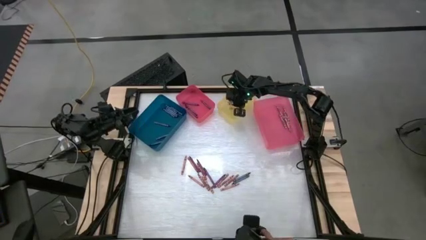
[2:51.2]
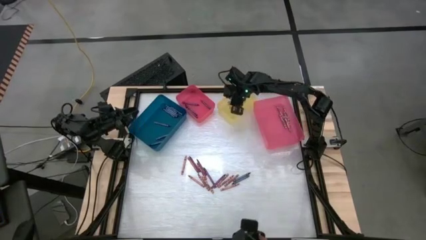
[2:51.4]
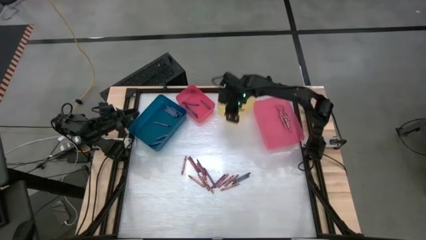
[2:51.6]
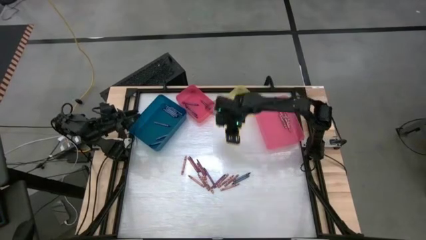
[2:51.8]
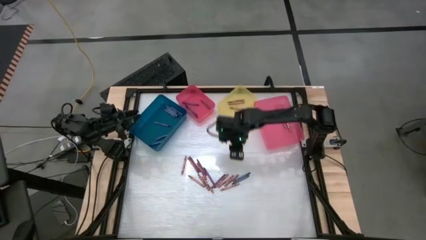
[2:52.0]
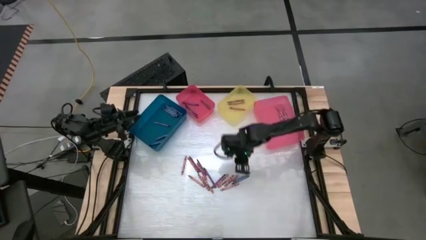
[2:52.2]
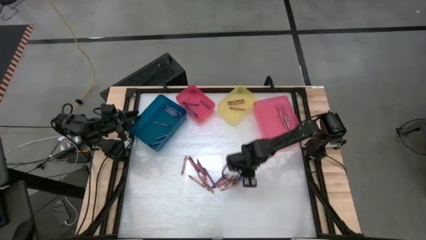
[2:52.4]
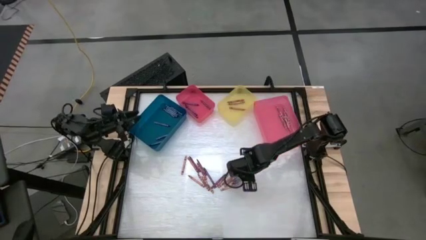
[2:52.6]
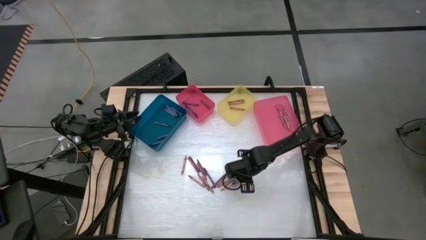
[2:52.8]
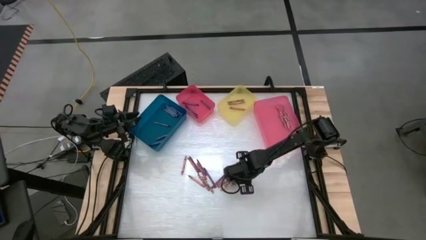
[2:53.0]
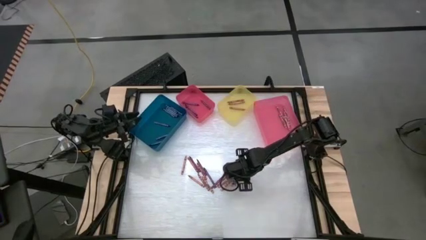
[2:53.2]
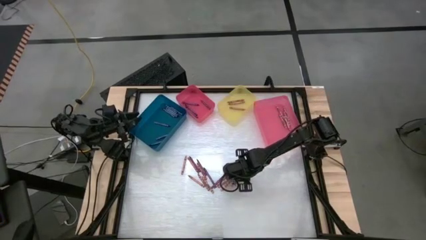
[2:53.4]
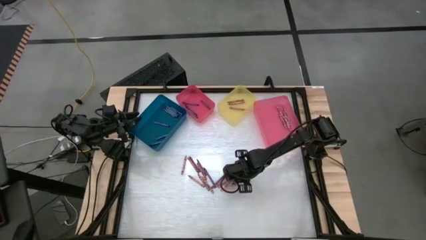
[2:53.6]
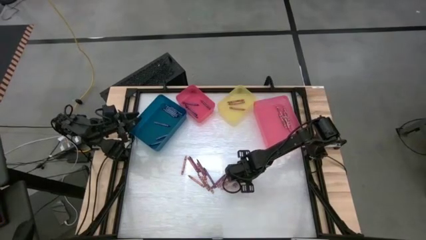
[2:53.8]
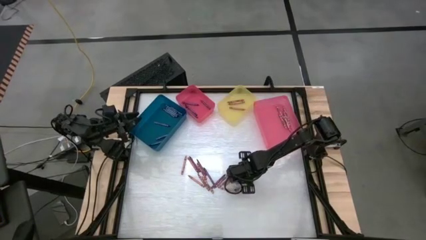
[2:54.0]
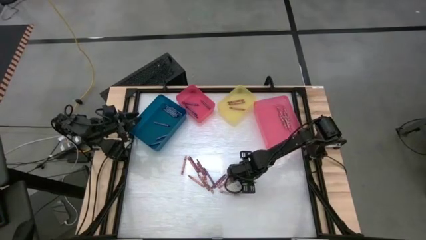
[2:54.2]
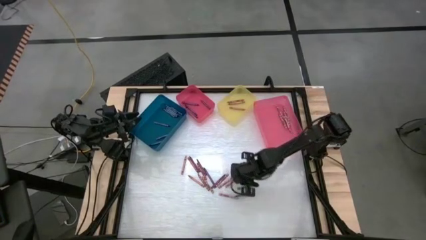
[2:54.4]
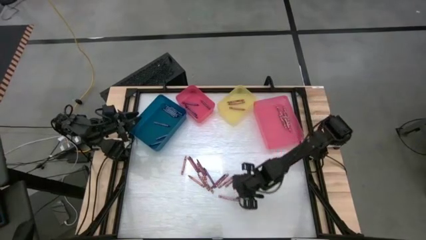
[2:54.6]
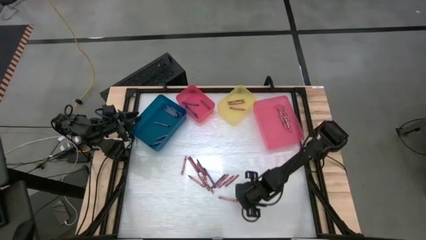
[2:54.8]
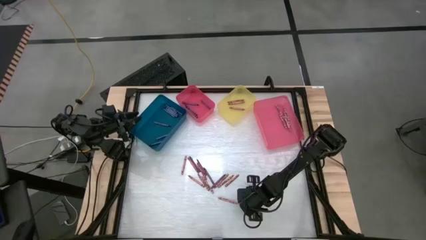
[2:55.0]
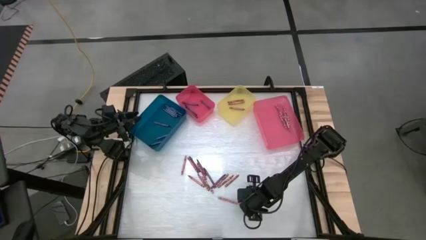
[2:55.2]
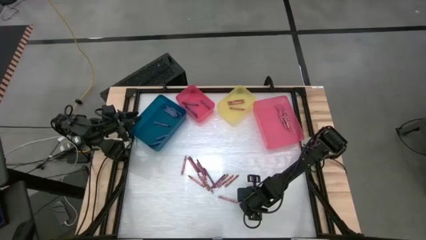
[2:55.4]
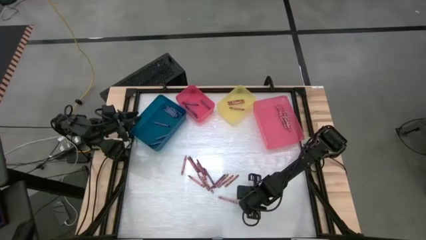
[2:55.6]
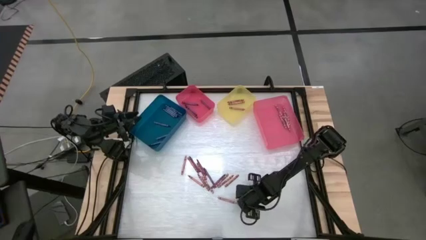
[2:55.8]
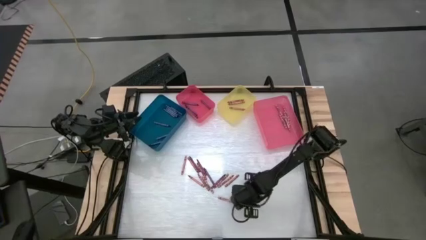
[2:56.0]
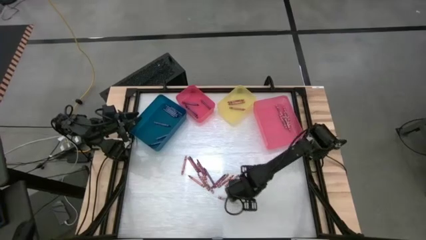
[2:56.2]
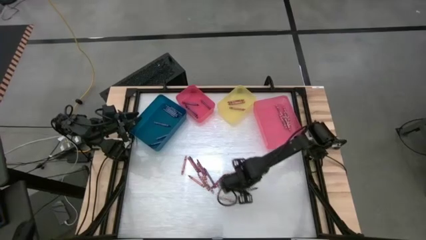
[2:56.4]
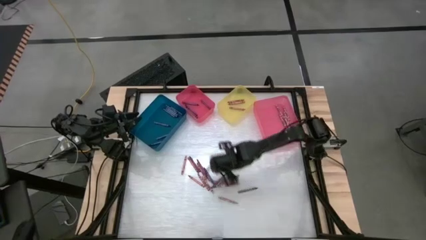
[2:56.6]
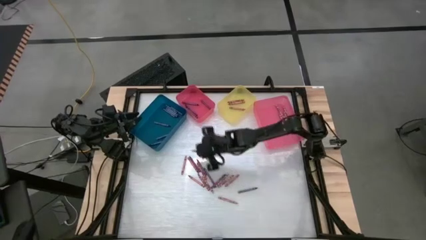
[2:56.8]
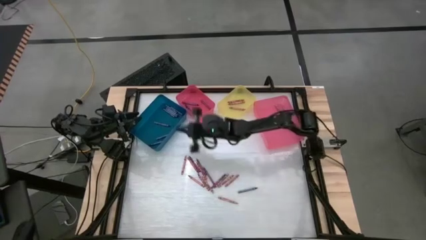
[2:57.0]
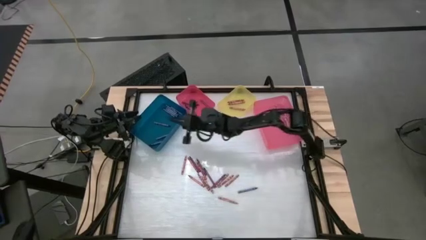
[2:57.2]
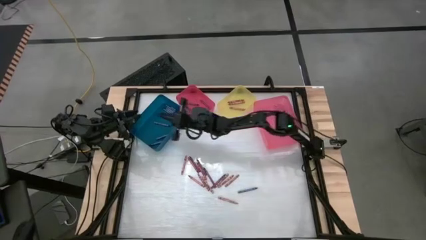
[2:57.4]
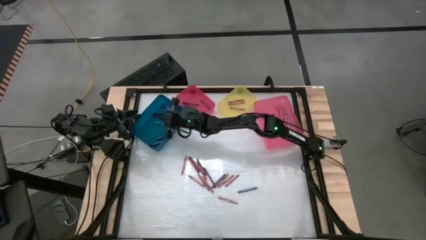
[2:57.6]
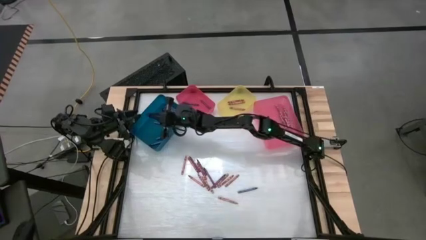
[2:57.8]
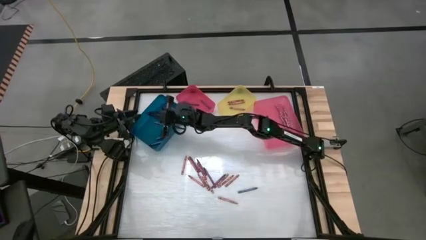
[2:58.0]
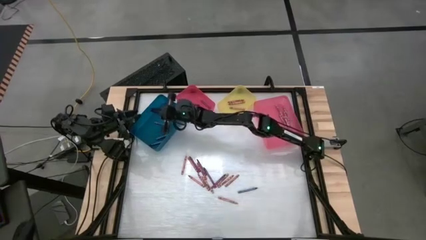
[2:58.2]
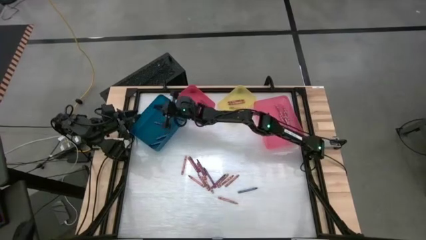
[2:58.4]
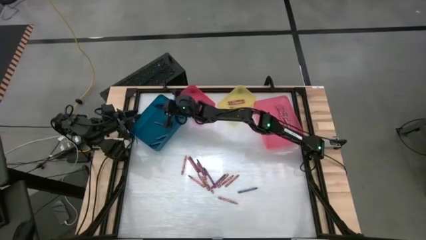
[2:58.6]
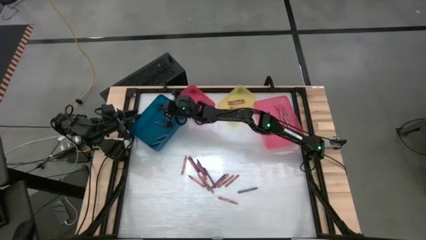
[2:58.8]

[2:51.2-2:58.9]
Task: Sort crayons
Put the blue crayon into the blue bin

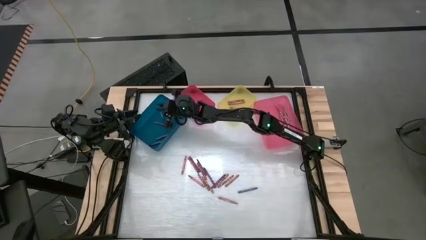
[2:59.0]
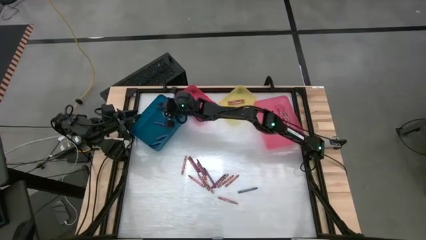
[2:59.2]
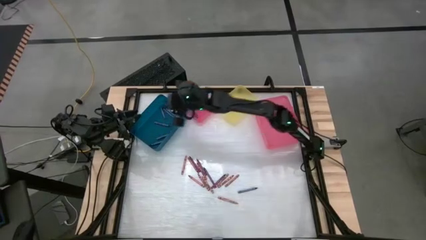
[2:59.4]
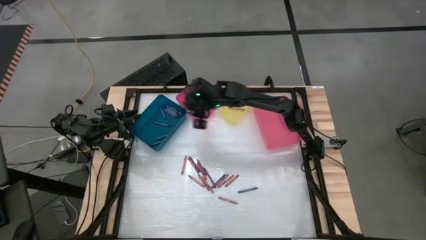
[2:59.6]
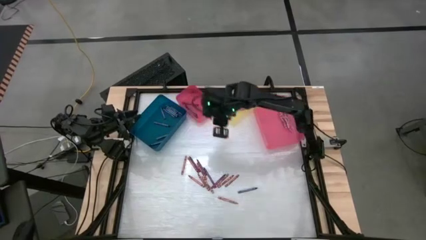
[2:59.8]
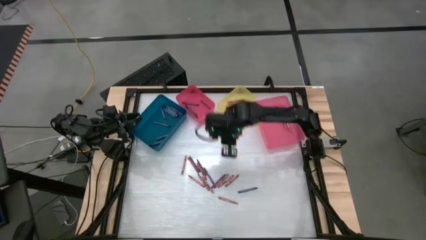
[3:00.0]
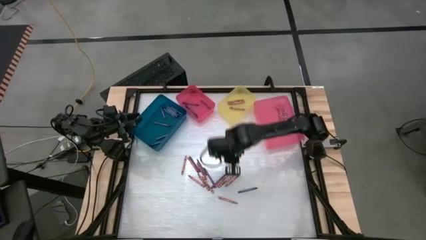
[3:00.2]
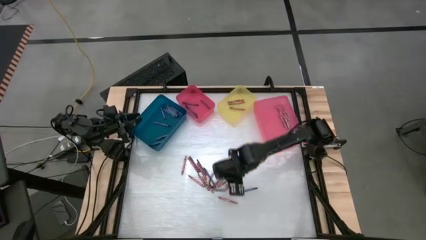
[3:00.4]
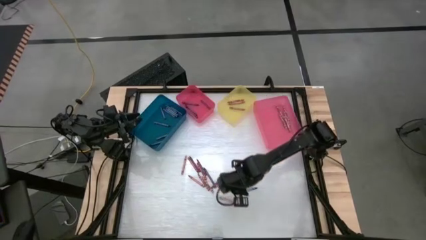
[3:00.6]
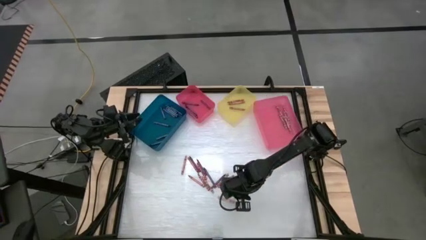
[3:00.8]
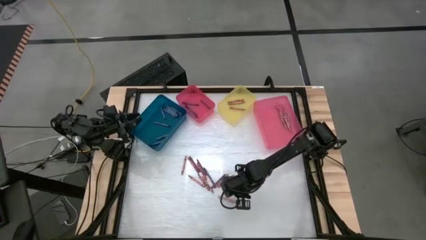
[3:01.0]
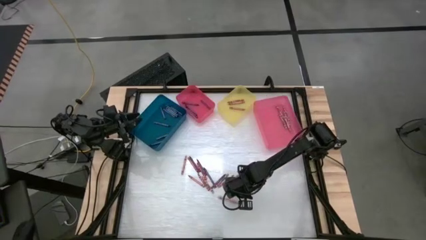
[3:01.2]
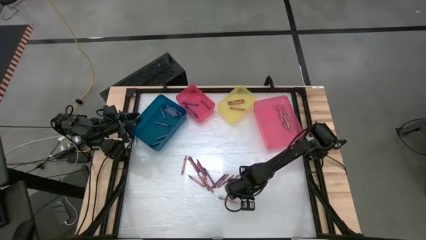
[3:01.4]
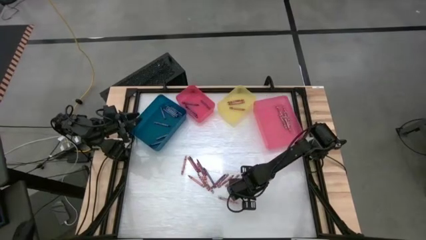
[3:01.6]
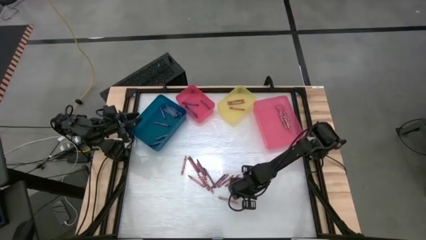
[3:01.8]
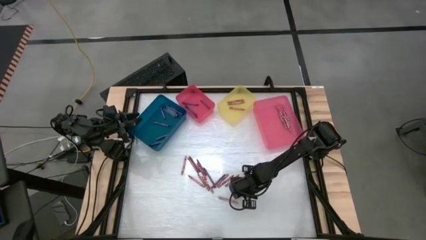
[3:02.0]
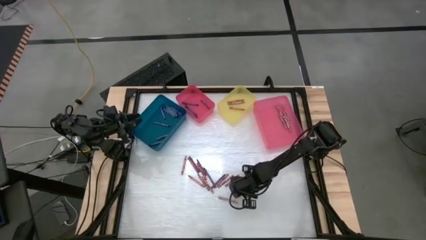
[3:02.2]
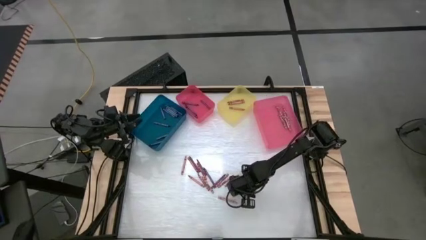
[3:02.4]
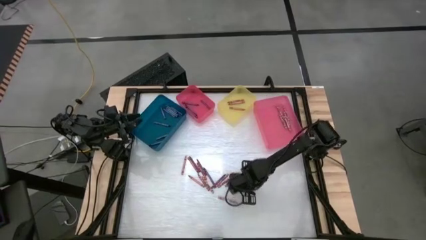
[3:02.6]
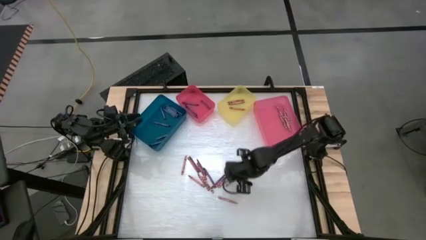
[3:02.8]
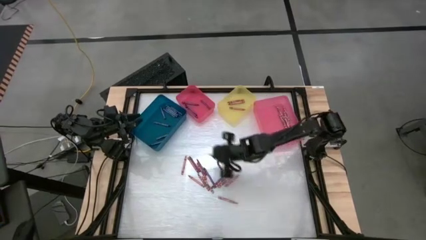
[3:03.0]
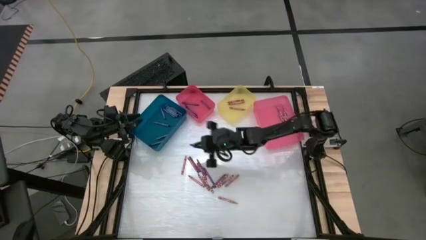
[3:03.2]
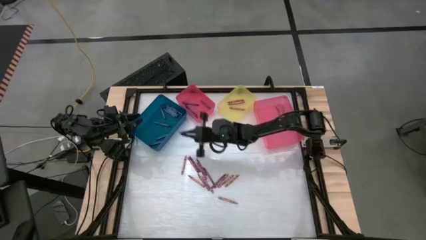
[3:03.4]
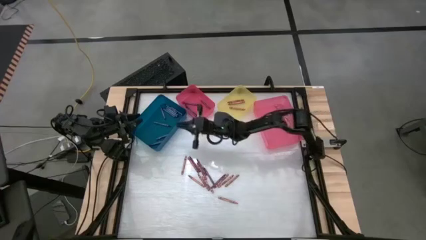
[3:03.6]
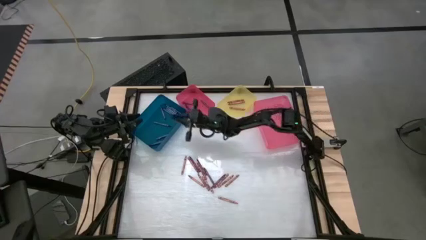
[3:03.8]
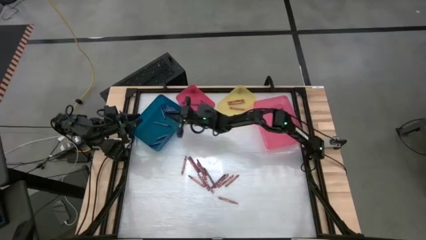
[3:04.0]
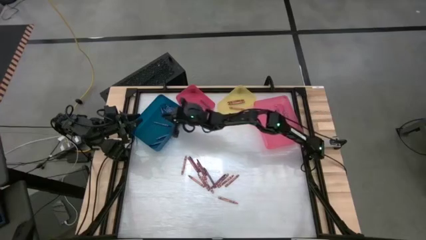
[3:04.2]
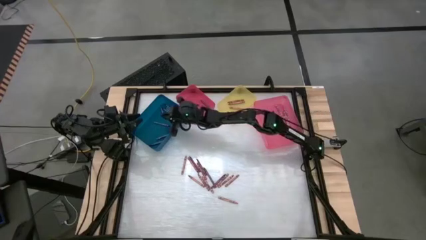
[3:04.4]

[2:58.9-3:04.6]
Put the blue crayon into the blue bin
